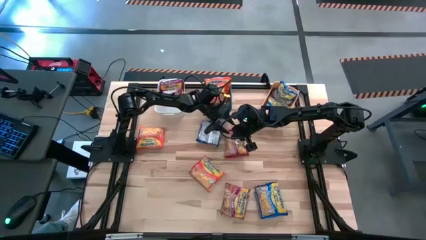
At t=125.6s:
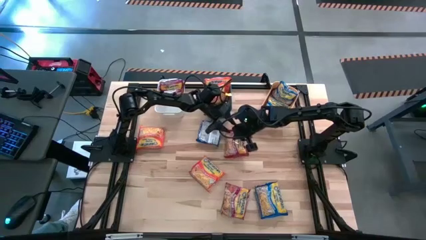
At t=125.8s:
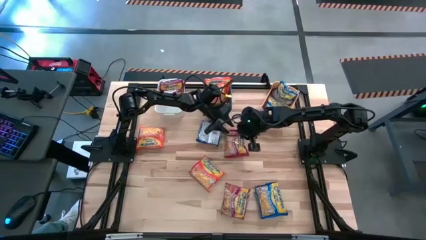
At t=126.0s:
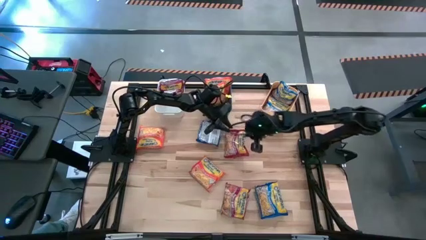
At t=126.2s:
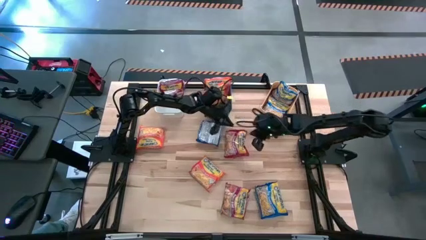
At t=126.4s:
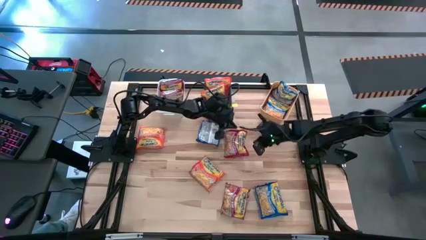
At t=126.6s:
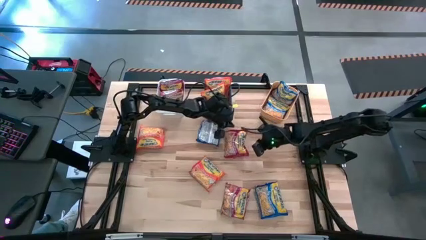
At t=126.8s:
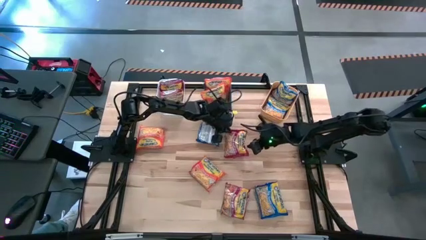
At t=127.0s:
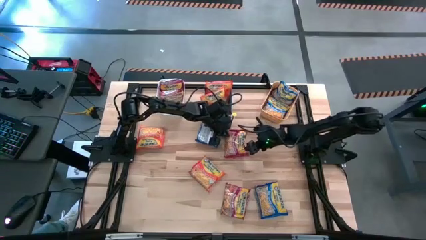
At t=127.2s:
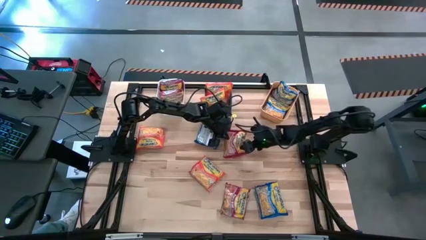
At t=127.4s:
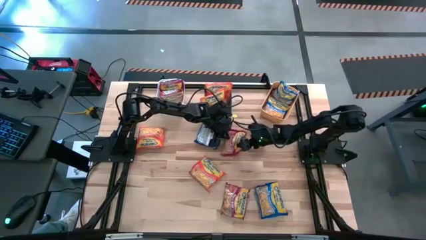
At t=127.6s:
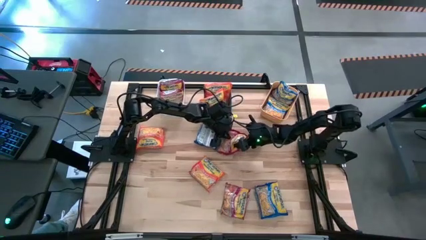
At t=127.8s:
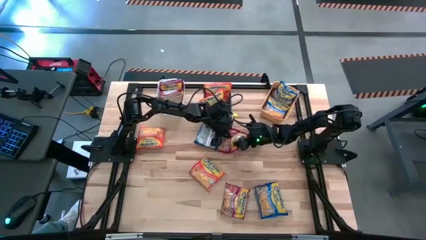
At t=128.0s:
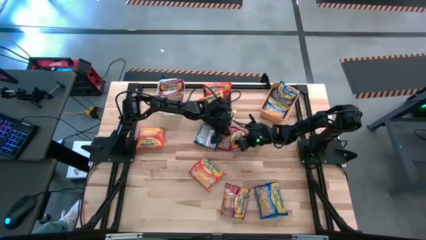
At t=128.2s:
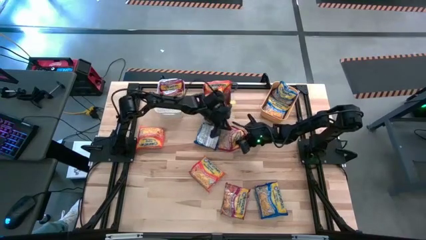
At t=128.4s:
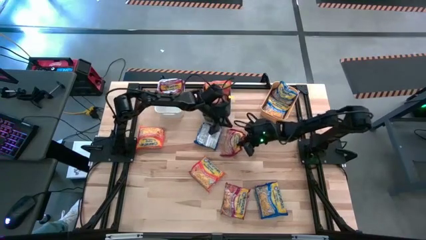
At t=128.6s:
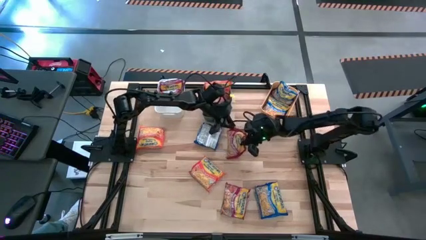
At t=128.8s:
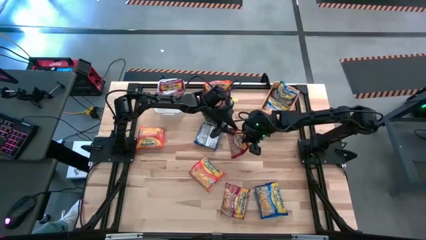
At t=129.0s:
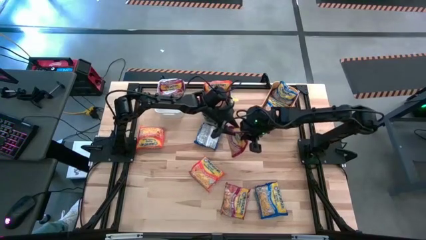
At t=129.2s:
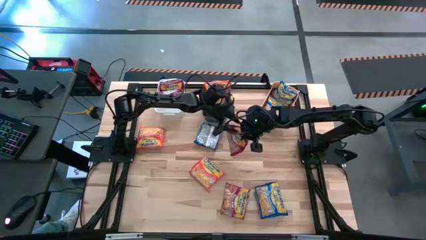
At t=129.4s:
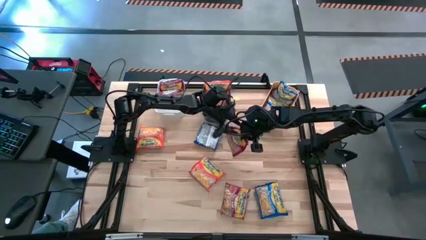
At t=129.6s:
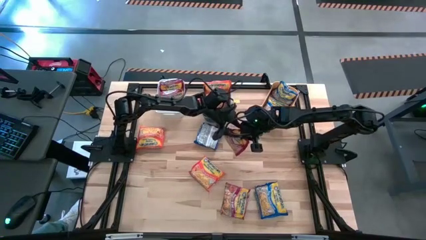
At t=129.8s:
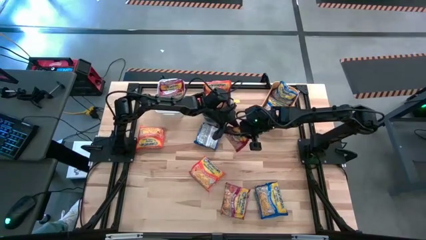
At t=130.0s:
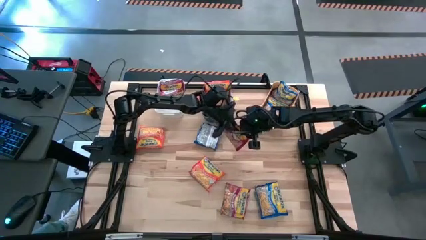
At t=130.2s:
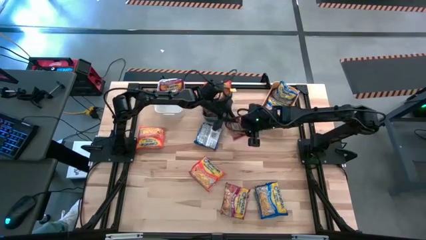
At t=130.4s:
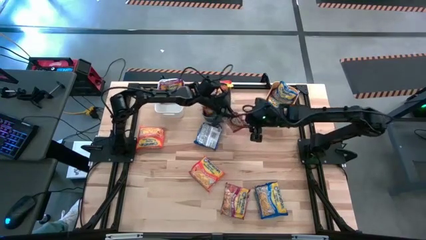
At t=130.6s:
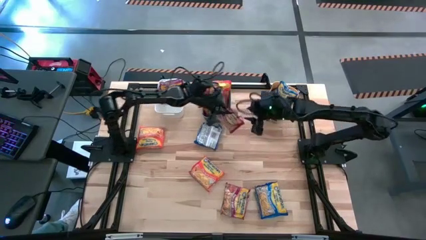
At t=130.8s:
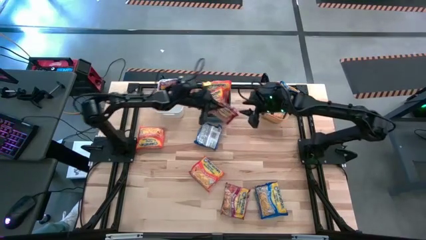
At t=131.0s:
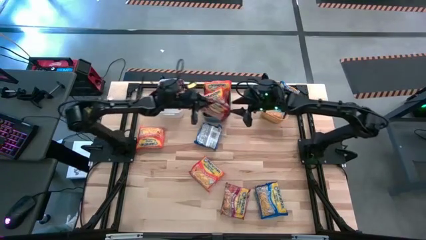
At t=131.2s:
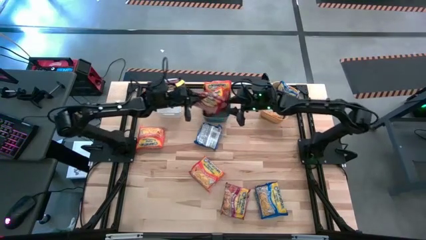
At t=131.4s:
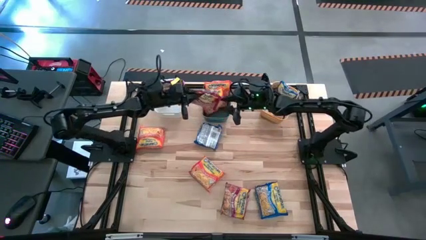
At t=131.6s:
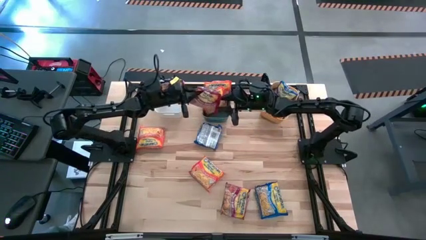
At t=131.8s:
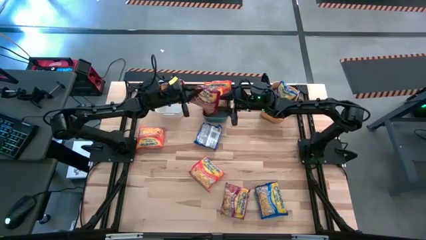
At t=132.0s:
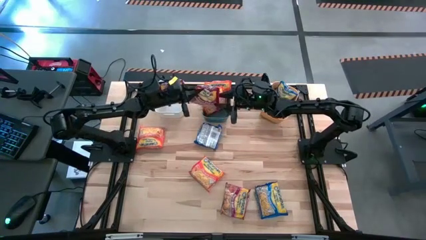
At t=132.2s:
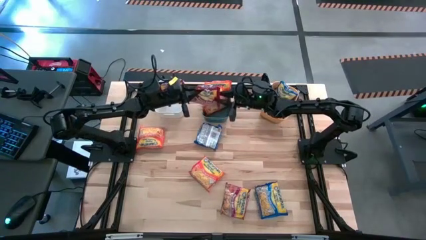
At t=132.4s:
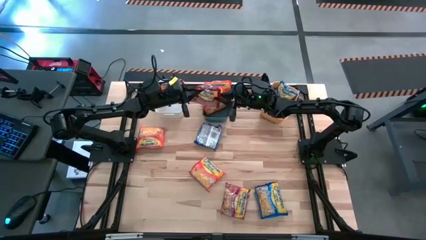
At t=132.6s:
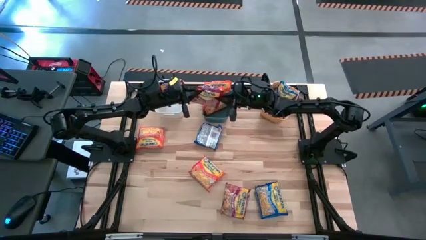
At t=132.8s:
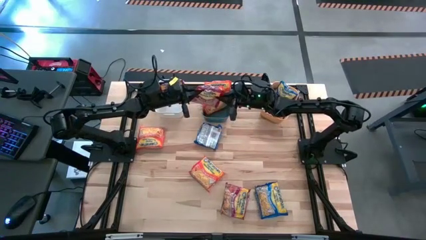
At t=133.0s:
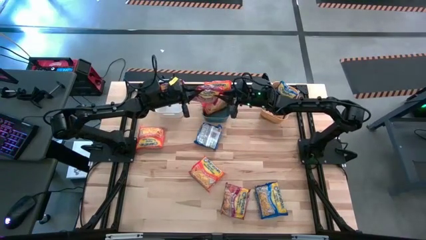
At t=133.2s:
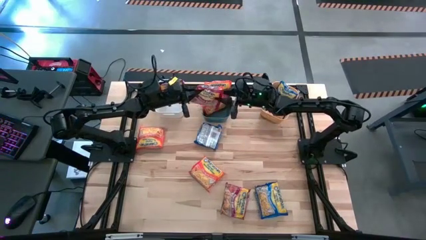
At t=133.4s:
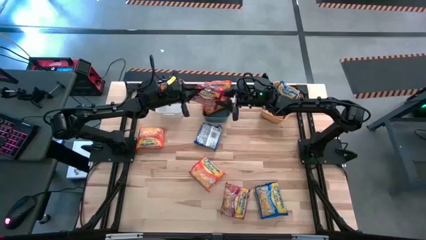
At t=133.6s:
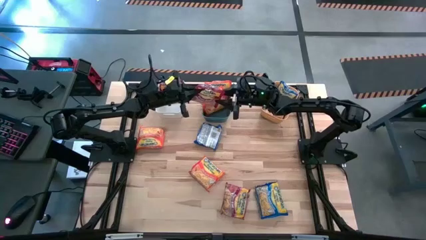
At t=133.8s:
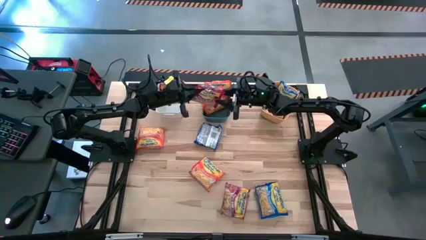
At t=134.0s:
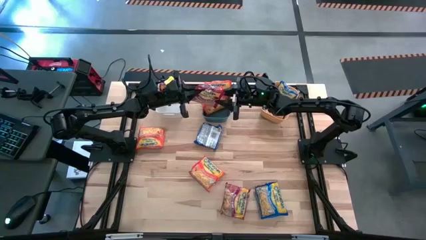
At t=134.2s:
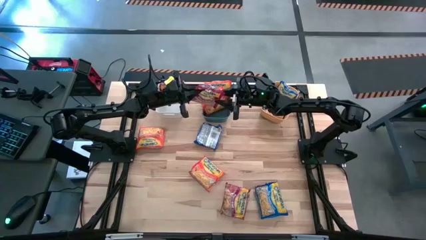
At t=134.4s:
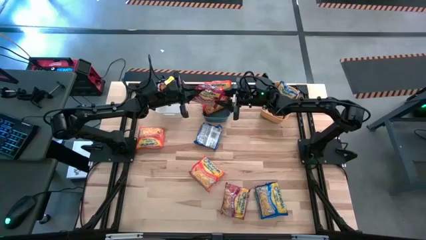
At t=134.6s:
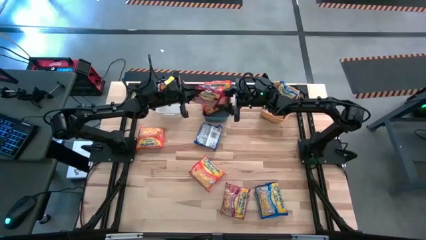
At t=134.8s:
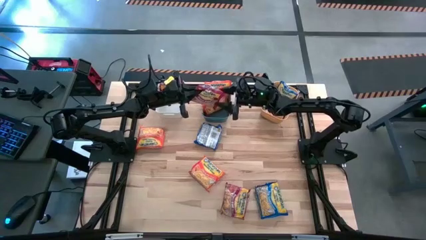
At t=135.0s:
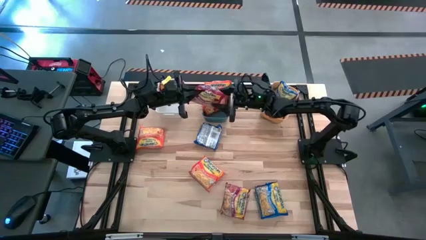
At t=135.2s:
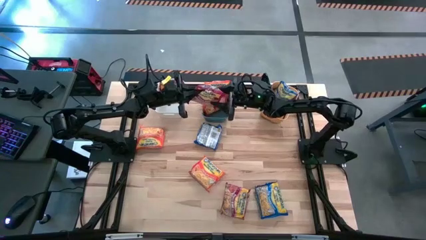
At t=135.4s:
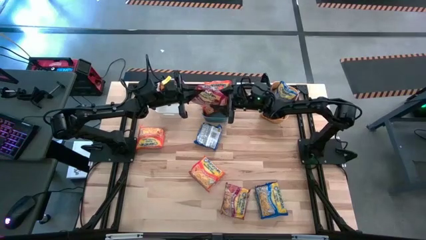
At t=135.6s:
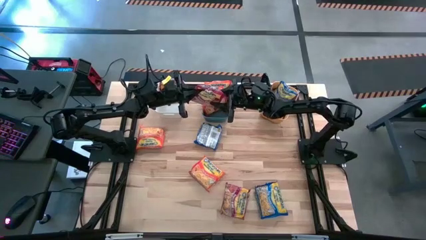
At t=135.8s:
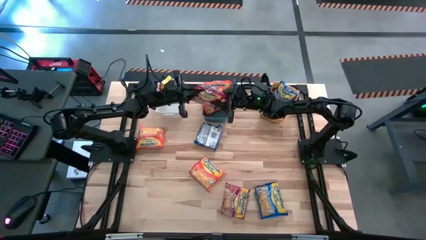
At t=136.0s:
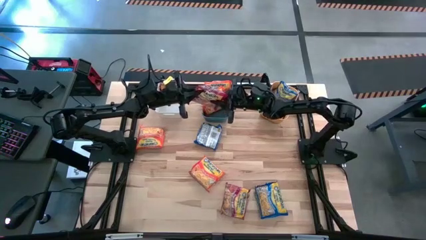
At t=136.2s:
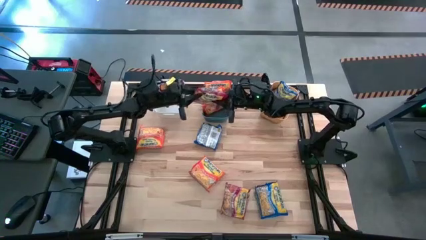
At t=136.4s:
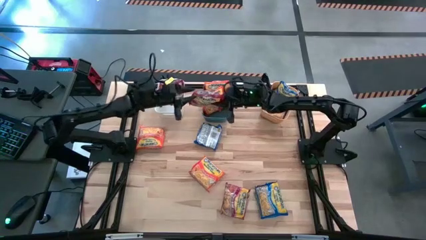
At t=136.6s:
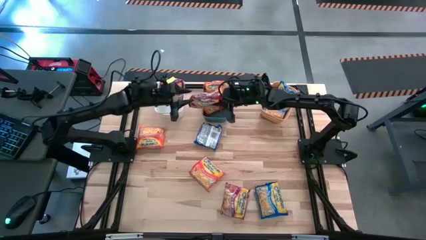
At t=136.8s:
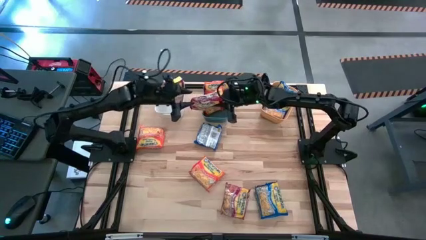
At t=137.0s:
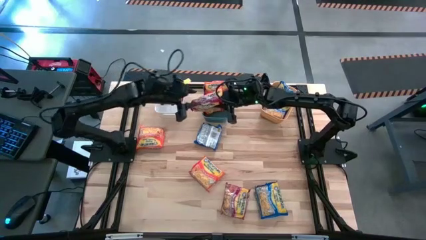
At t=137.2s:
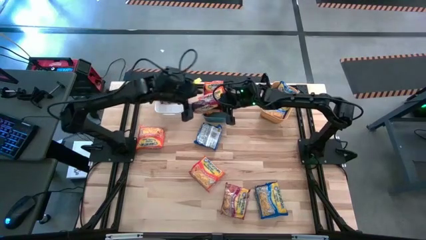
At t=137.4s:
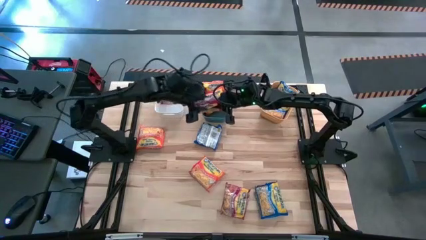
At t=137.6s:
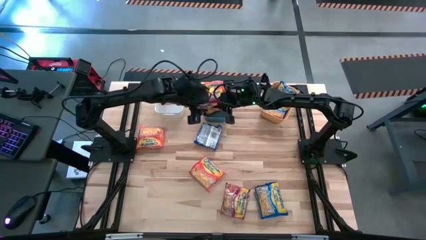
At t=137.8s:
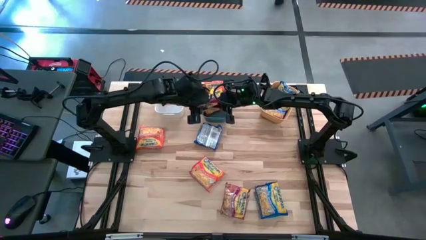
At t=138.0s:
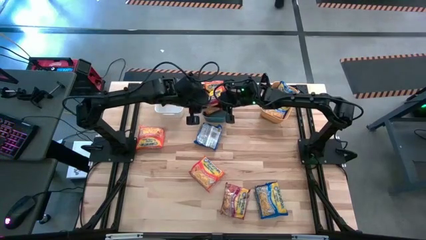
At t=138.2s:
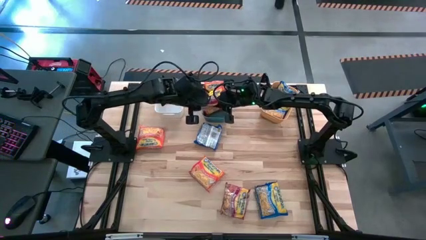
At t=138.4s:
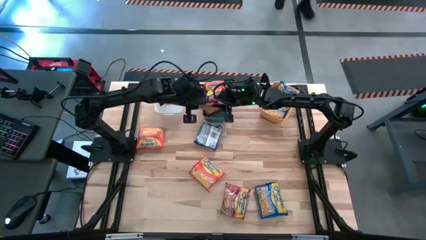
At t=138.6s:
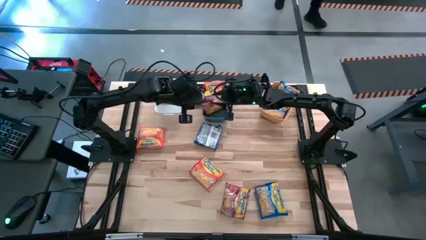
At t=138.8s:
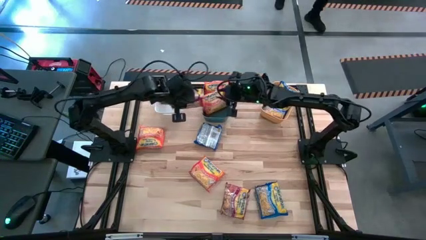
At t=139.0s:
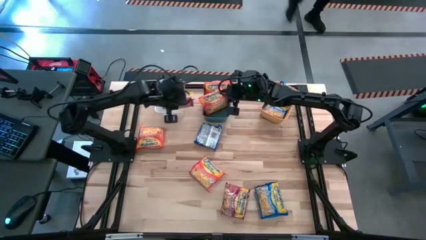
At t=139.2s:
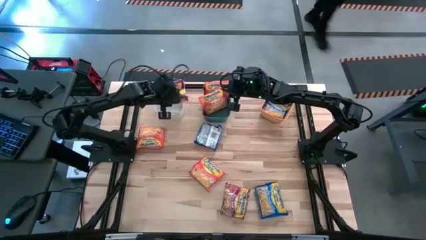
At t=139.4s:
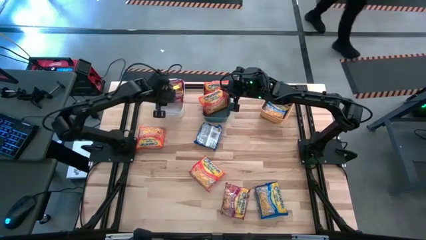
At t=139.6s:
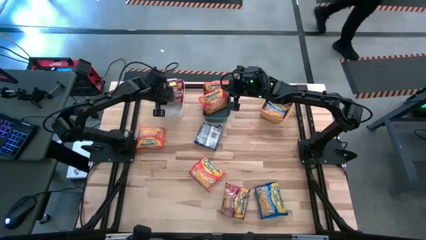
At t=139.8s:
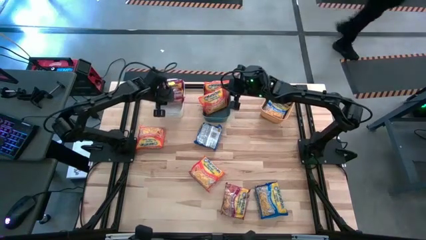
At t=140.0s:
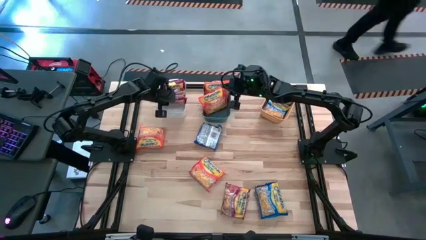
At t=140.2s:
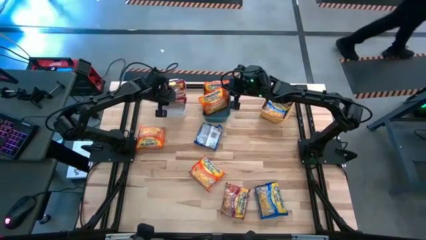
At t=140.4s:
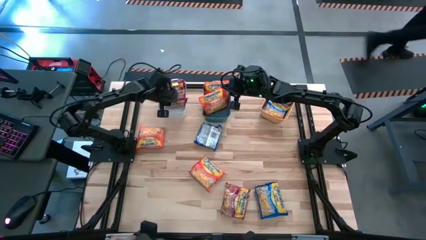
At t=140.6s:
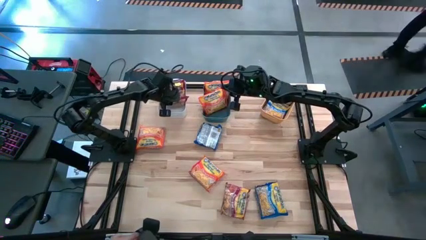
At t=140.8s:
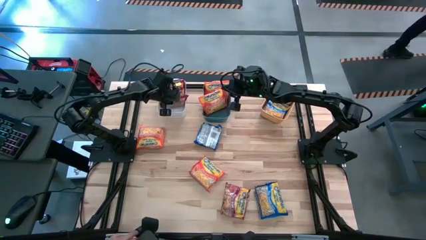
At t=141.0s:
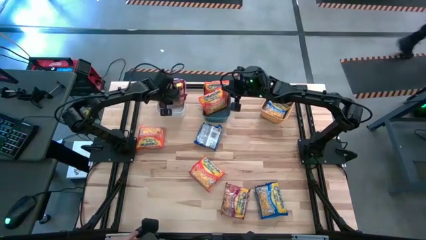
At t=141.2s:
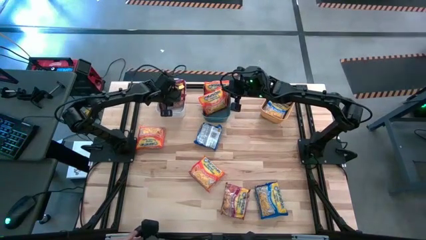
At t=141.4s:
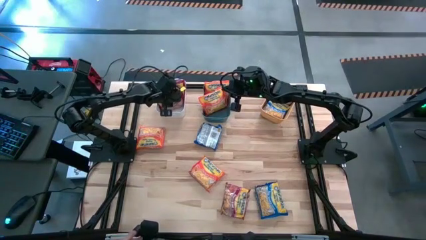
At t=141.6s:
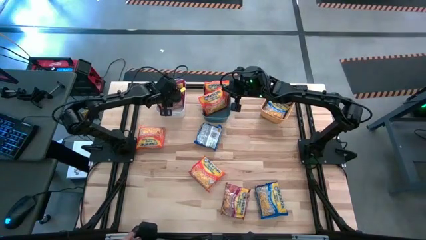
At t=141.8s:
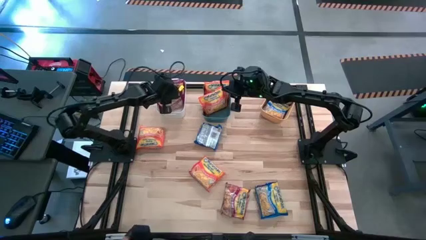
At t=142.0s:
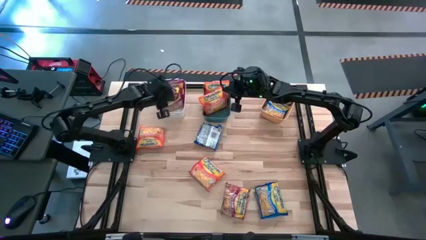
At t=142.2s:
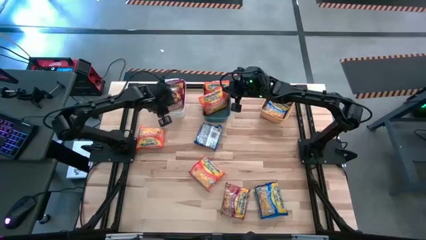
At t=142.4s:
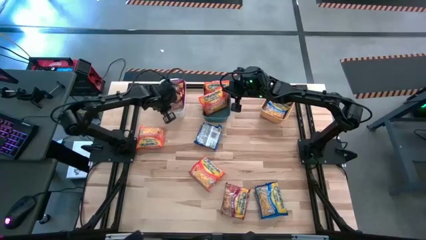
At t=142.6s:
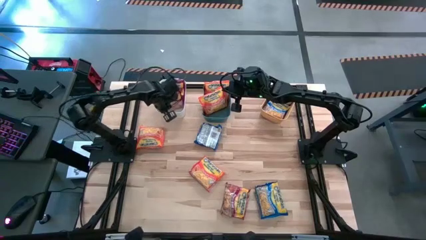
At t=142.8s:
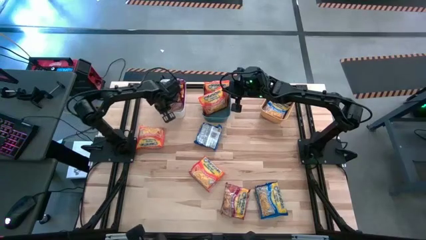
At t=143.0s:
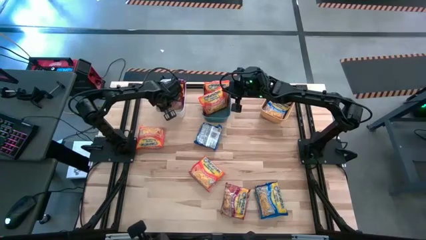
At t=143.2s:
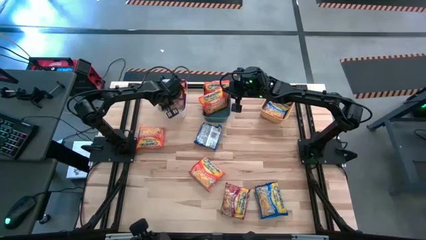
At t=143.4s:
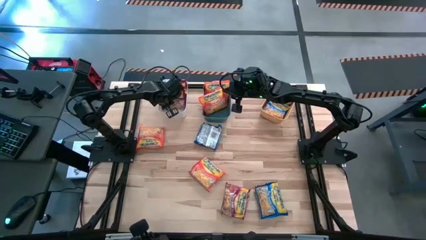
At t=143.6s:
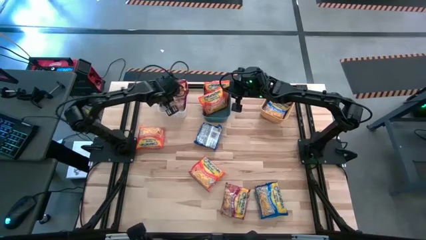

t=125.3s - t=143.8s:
Task: Sort Maruchan noodles
Put the red noodle pack into the white bin
